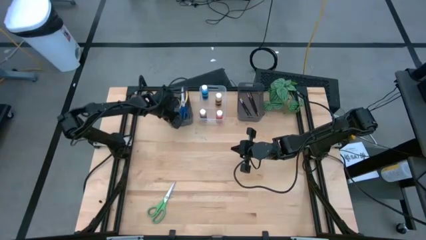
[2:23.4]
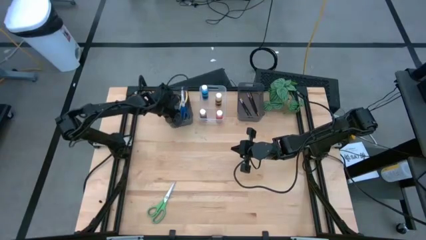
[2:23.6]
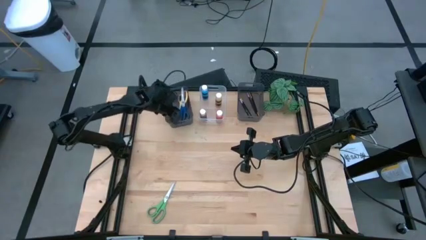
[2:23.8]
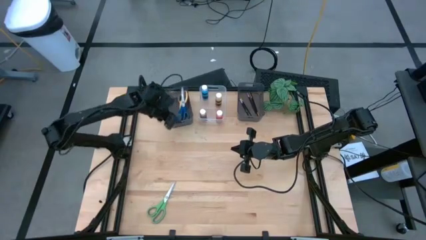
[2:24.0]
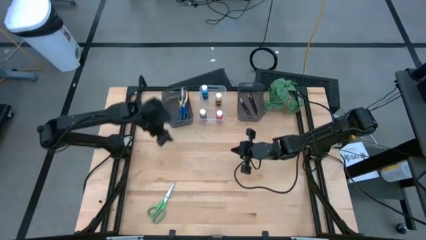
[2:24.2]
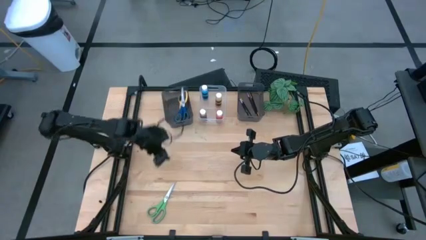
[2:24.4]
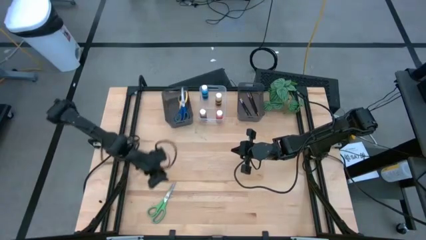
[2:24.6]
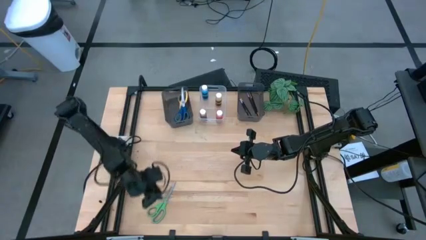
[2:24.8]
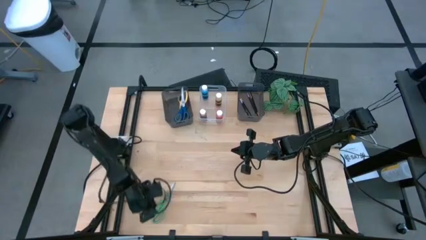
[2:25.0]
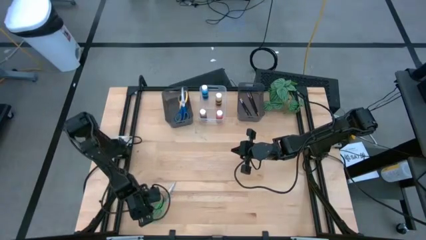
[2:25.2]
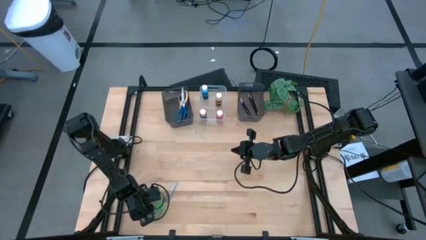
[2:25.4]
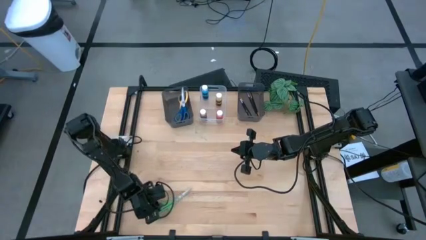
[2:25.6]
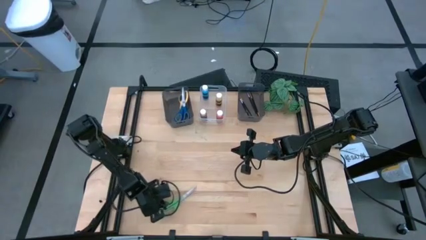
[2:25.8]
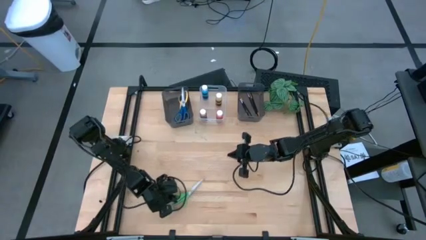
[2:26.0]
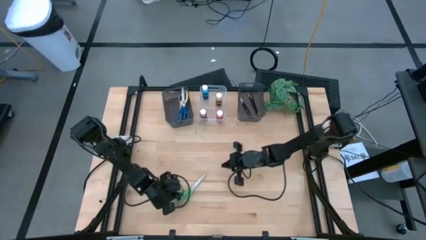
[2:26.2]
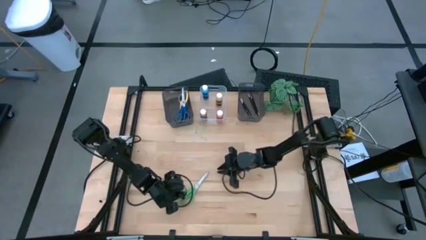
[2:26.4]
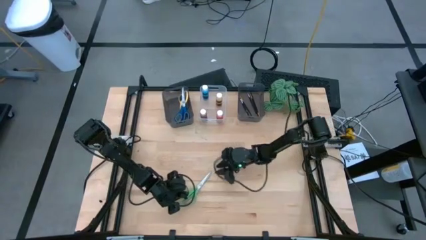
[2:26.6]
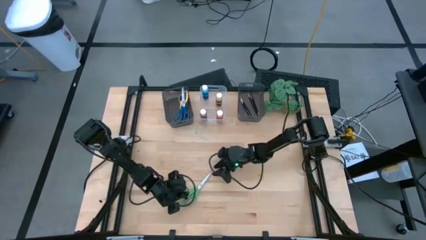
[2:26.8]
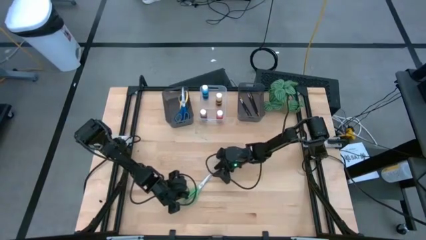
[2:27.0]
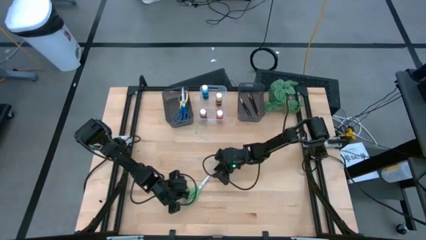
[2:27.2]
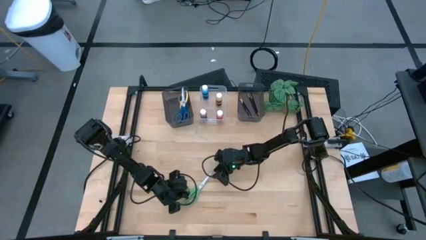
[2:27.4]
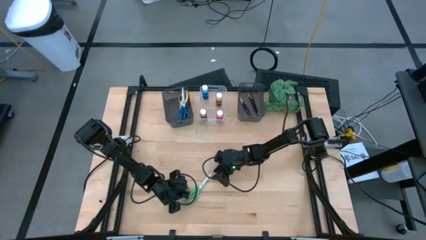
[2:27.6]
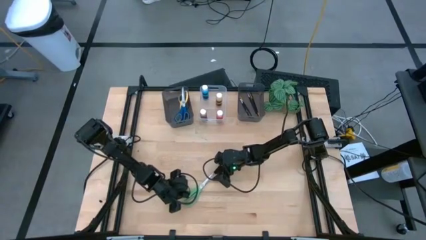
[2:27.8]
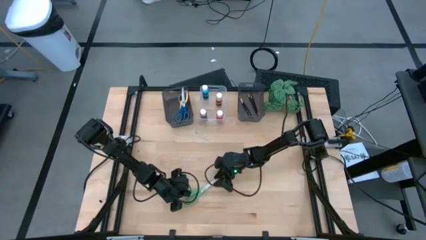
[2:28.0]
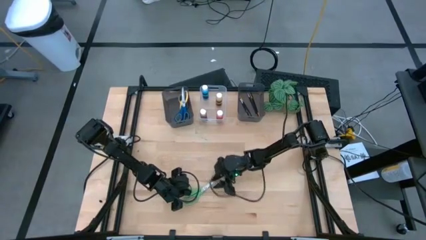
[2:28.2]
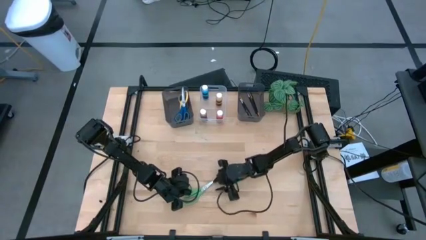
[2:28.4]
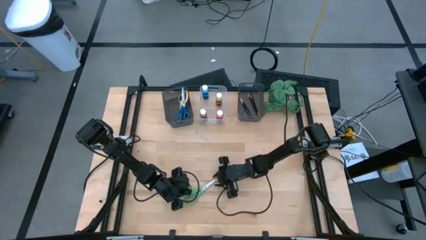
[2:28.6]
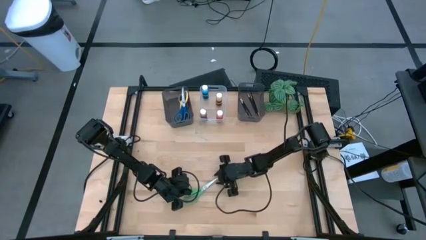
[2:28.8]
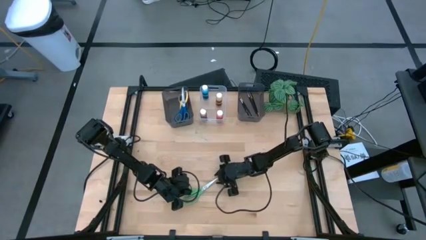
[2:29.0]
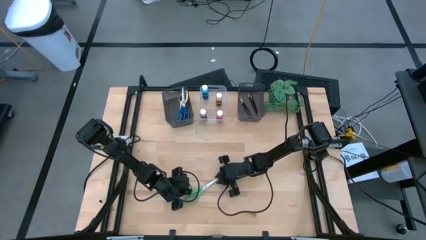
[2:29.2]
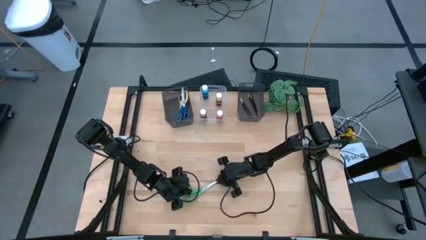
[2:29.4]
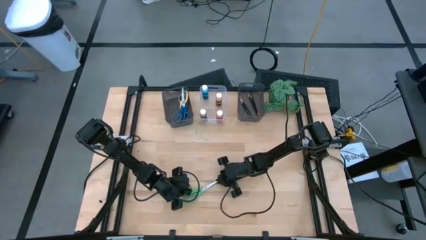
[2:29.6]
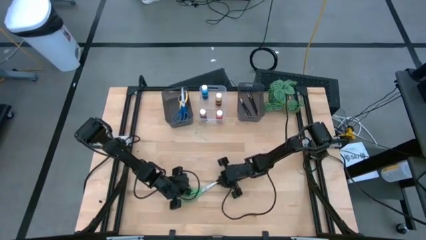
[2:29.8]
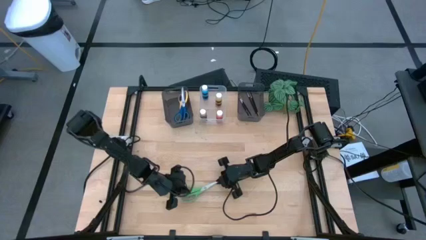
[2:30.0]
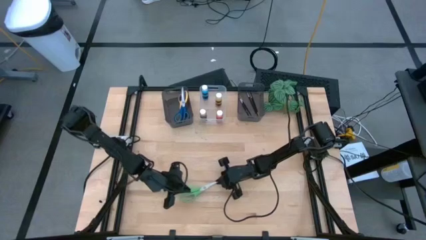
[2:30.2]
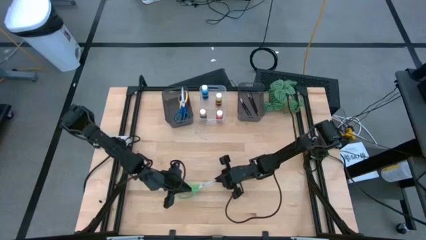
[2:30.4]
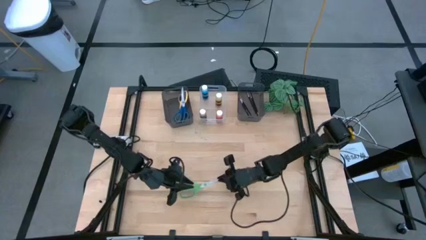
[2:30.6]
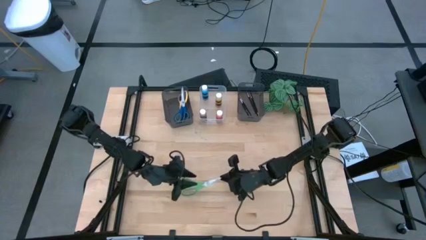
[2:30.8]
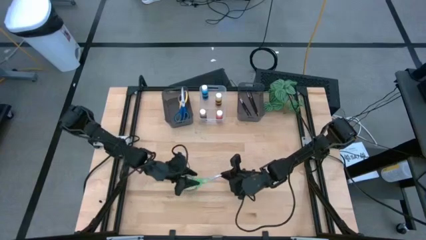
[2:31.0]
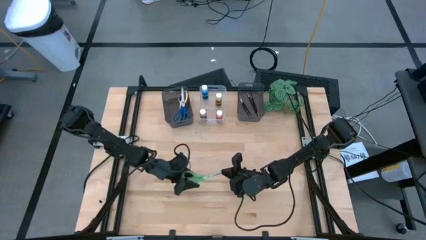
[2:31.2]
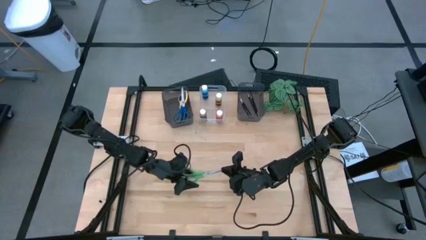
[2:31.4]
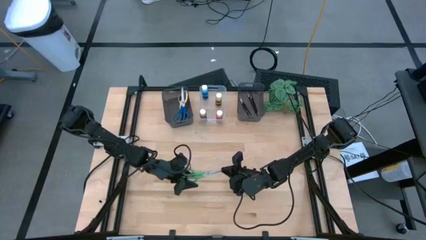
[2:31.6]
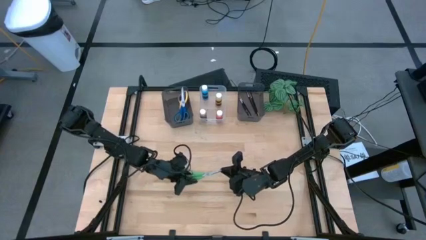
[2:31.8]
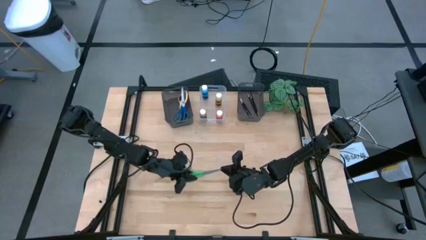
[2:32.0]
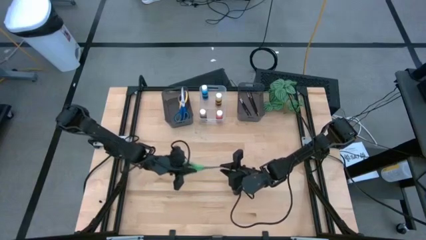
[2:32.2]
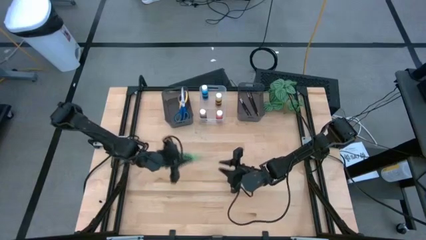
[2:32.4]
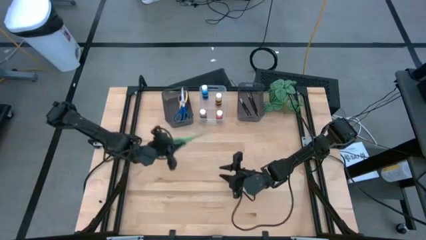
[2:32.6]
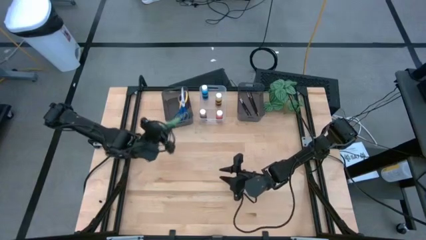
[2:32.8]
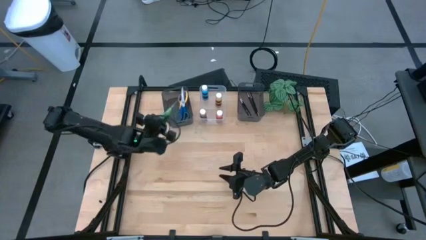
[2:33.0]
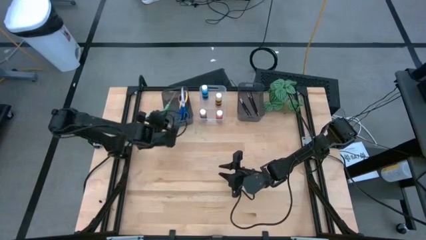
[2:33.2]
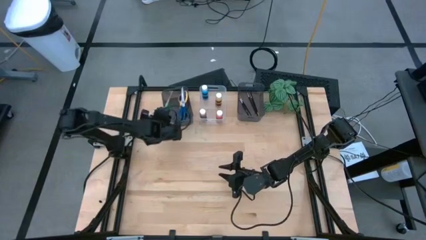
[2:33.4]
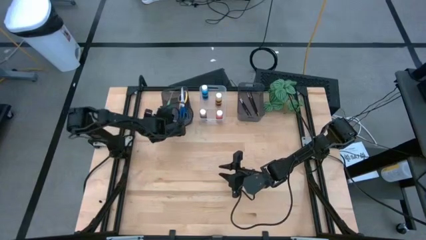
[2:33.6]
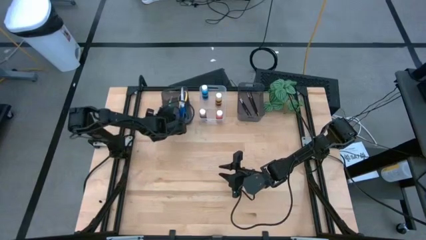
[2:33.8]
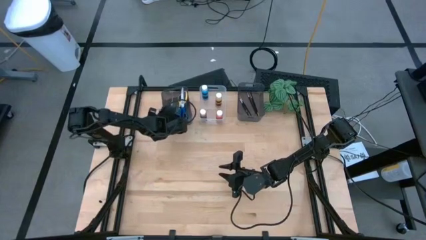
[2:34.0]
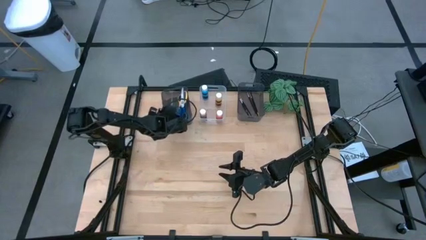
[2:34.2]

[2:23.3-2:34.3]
Task: Pick & Place Paint Supplies
Put the green scissors into the left black bin

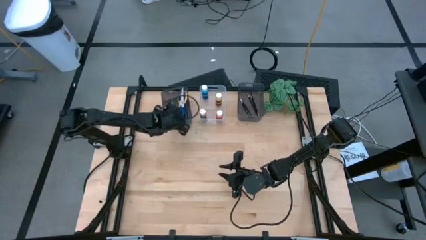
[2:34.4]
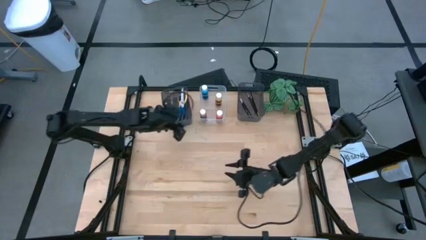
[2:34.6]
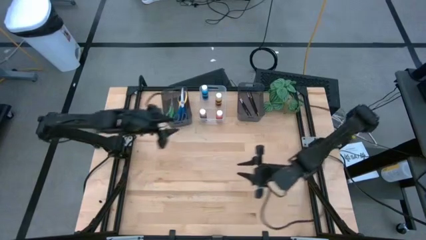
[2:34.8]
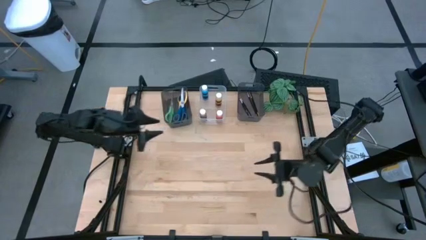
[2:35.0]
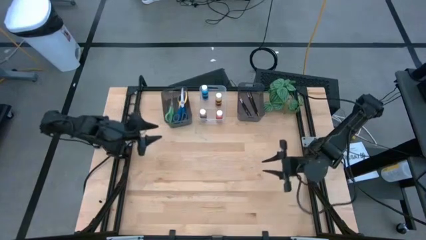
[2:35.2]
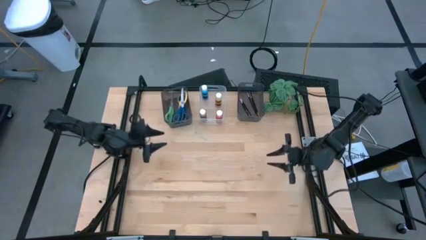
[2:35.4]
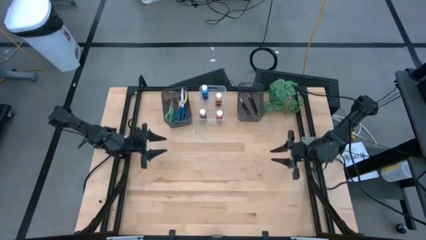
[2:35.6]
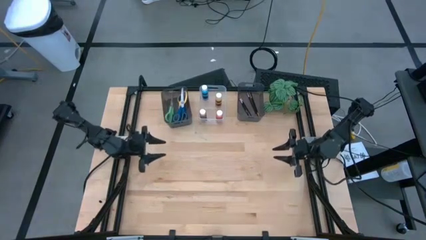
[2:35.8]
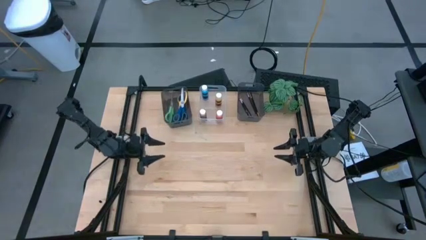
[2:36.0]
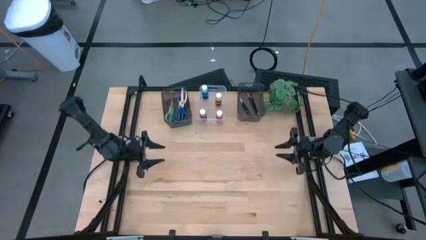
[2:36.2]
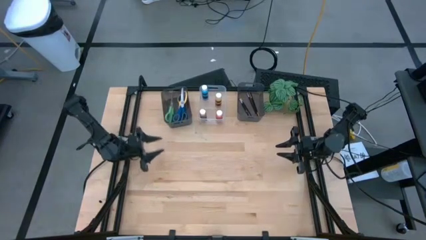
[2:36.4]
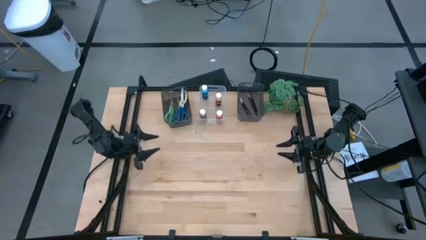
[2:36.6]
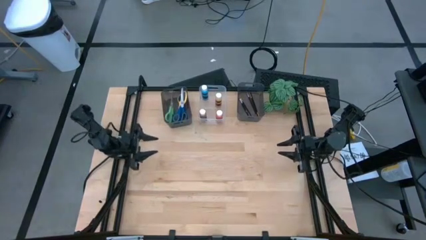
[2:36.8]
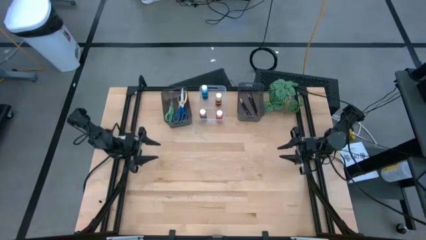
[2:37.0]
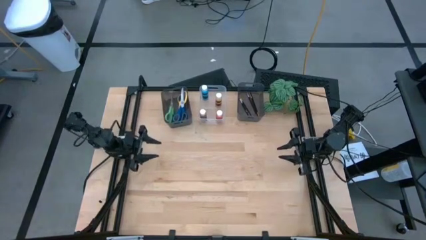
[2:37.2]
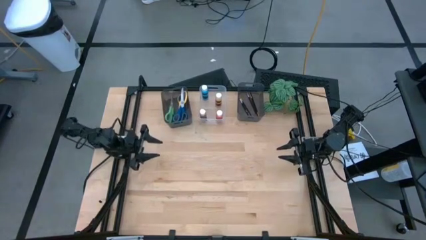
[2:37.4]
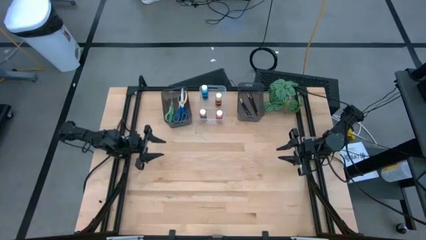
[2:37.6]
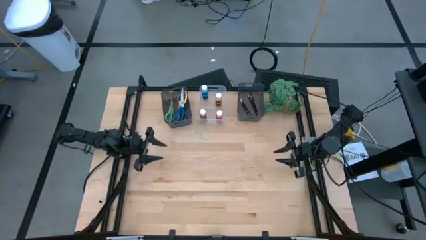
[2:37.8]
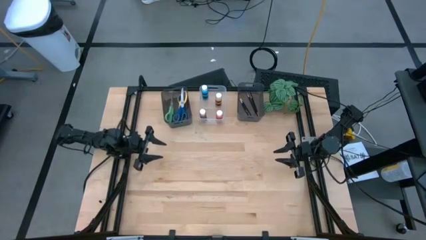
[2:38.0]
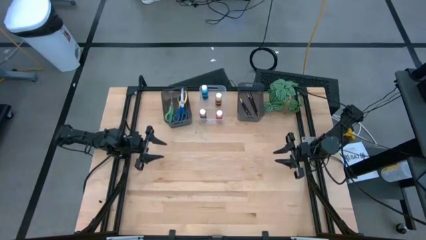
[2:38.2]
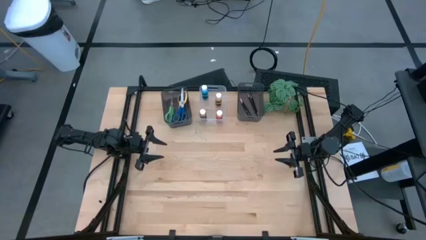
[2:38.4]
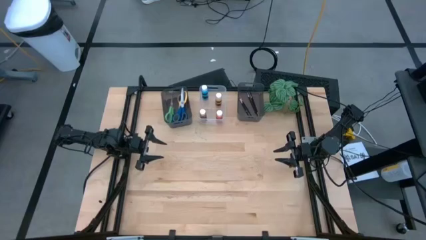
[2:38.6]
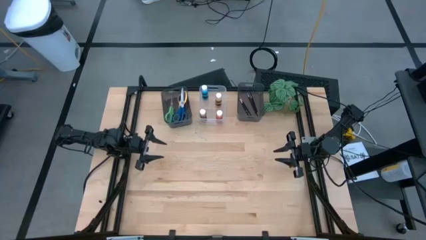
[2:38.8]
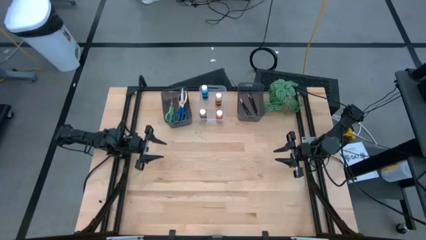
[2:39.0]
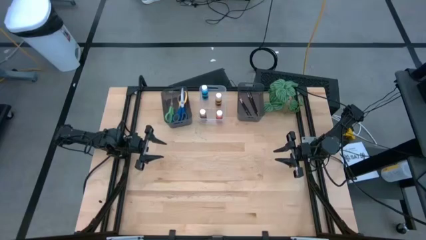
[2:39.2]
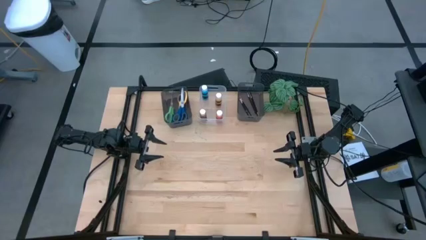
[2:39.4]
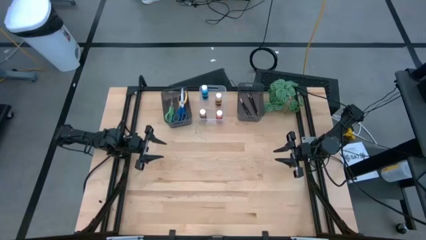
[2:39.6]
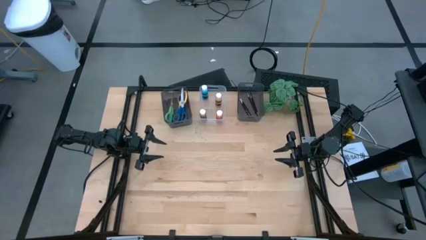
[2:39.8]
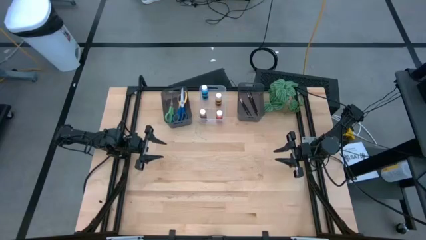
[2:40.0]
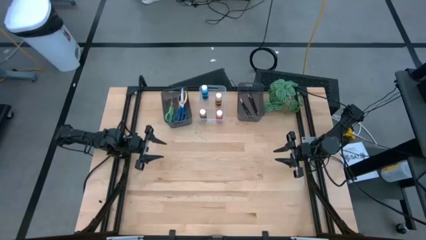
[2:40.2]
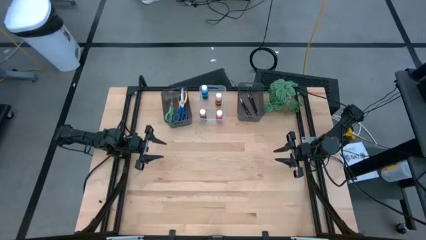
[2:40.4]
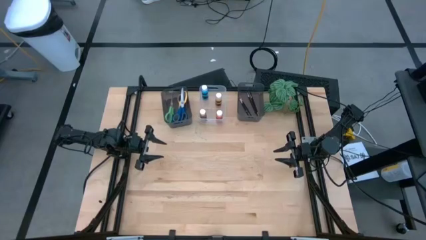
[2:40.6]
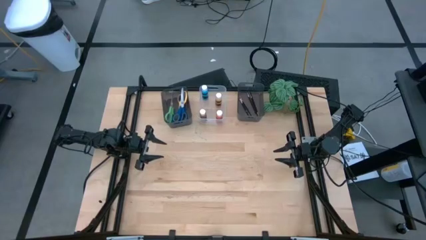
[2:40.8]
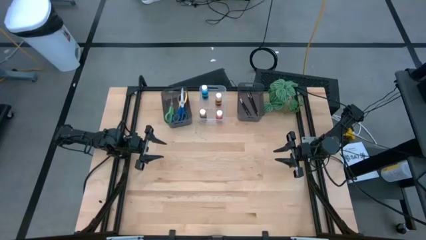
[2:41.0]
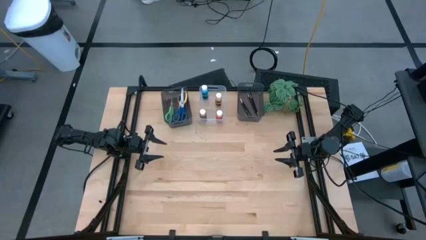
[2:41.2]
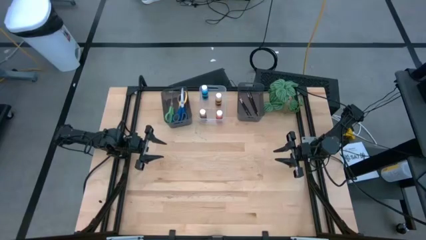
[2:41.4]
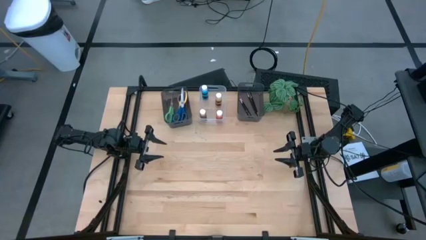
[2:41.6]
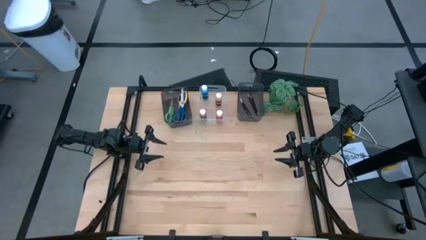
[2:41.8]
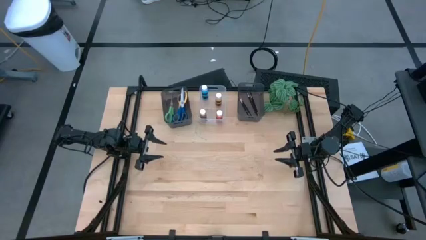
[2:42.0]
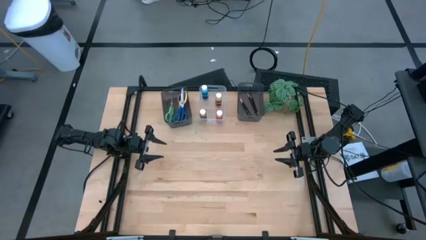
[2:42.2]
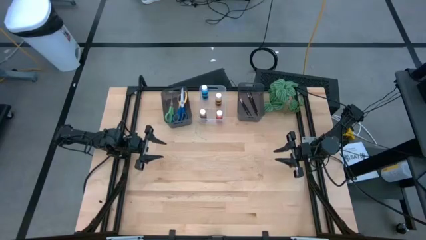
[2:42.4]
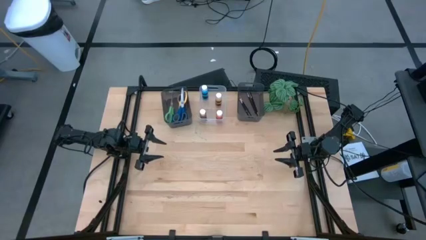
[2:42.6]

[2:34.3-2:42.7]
Return to Home Position
